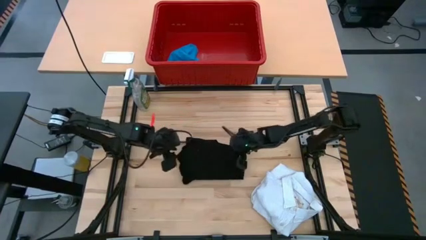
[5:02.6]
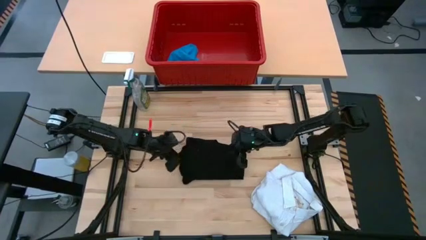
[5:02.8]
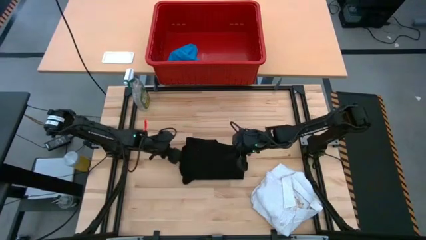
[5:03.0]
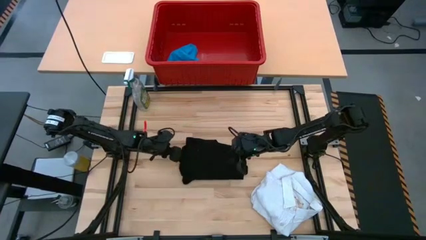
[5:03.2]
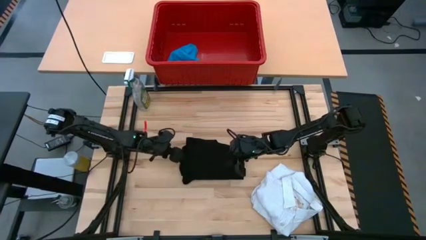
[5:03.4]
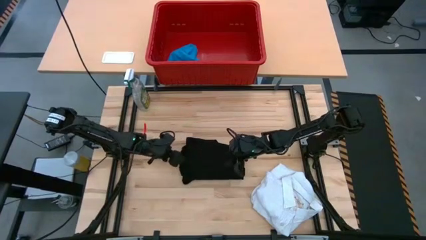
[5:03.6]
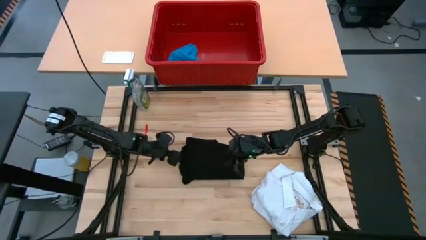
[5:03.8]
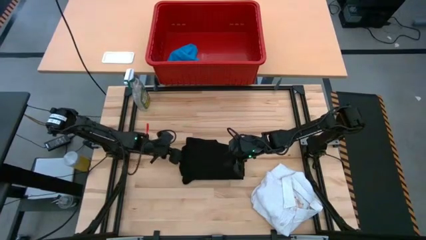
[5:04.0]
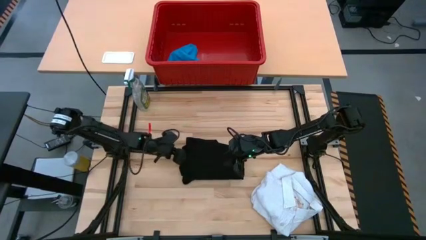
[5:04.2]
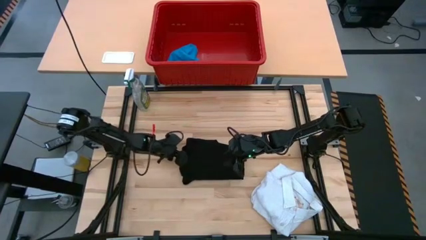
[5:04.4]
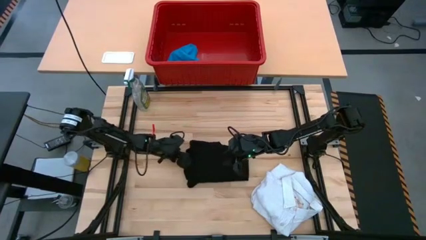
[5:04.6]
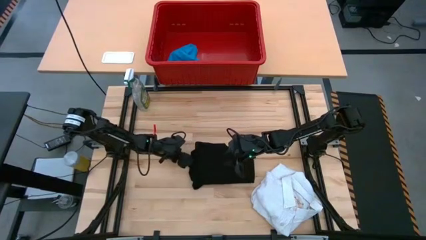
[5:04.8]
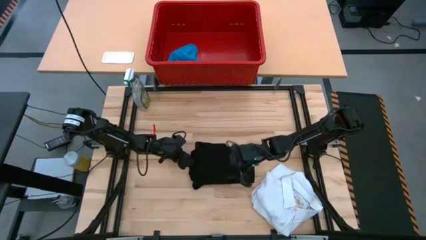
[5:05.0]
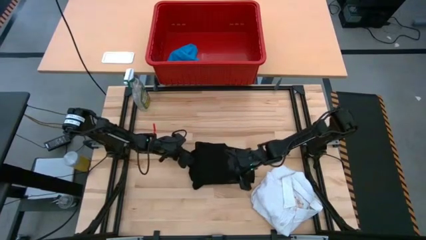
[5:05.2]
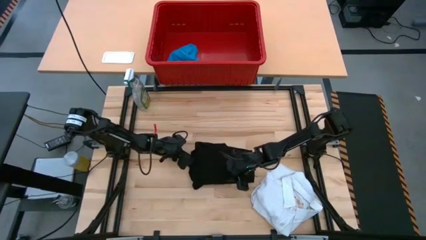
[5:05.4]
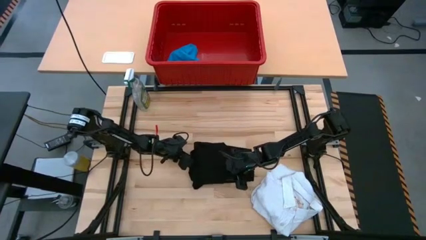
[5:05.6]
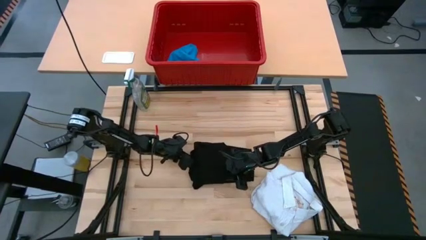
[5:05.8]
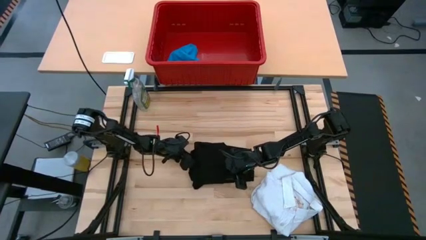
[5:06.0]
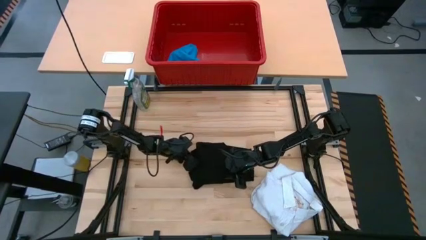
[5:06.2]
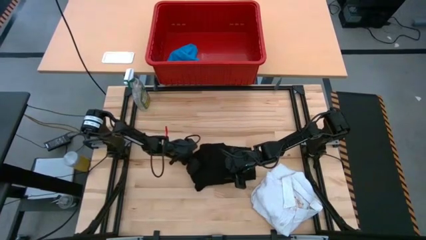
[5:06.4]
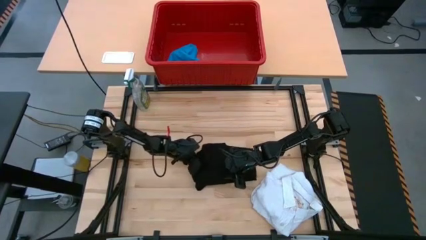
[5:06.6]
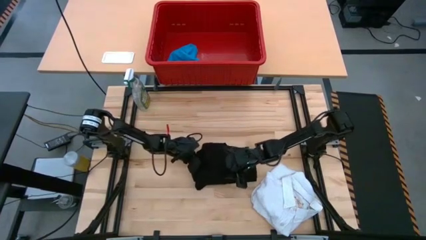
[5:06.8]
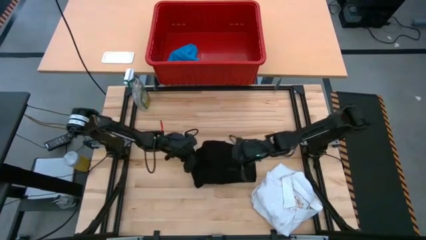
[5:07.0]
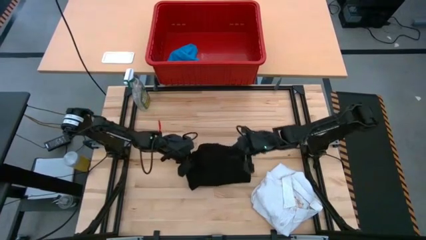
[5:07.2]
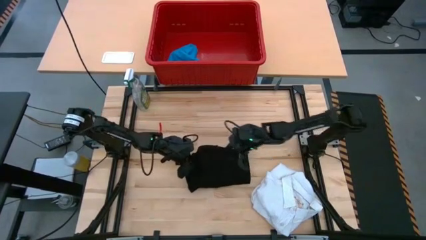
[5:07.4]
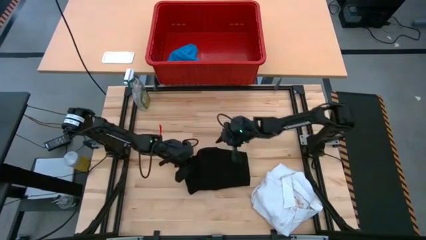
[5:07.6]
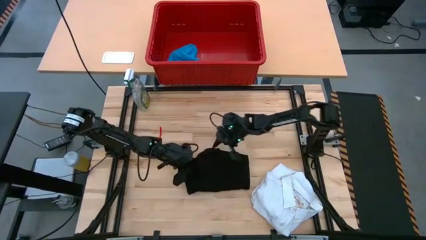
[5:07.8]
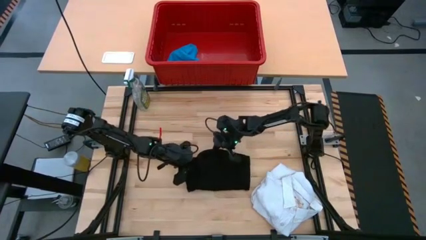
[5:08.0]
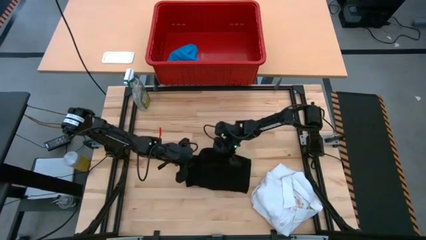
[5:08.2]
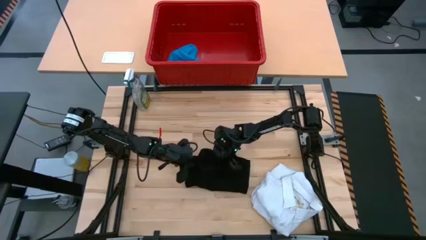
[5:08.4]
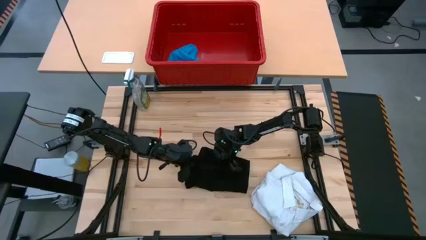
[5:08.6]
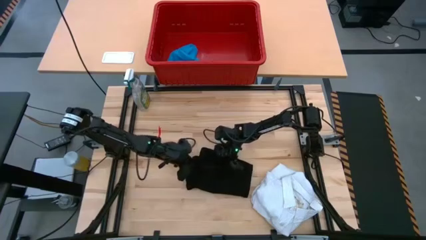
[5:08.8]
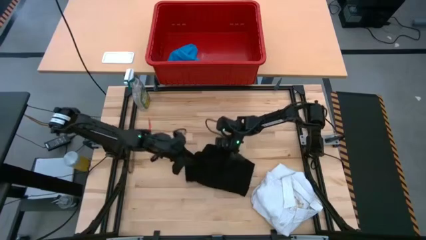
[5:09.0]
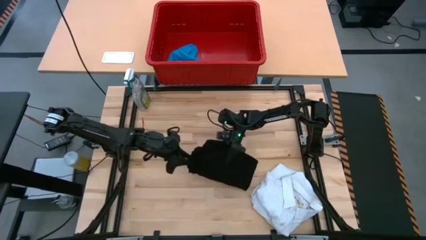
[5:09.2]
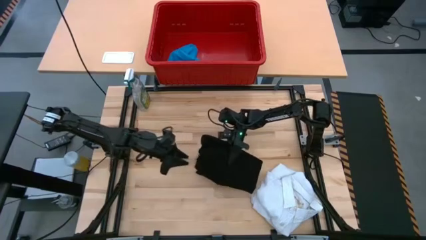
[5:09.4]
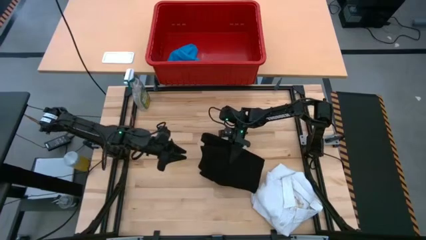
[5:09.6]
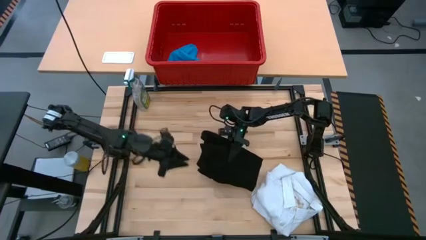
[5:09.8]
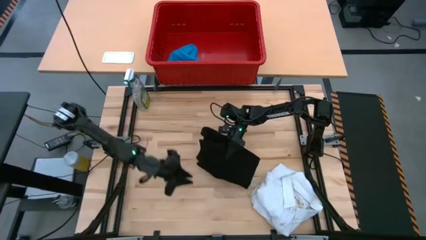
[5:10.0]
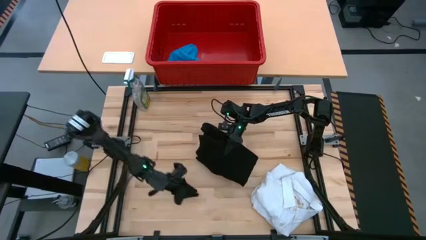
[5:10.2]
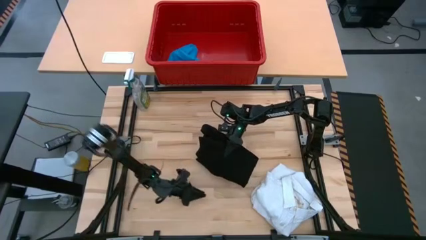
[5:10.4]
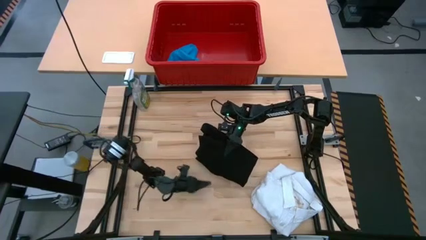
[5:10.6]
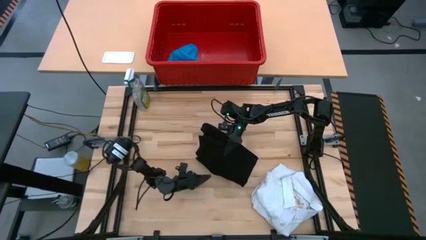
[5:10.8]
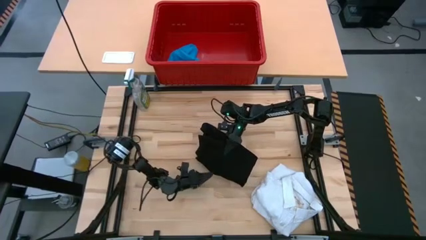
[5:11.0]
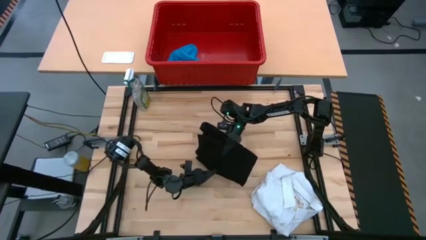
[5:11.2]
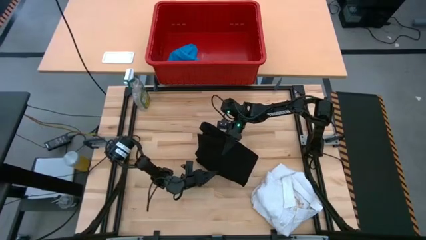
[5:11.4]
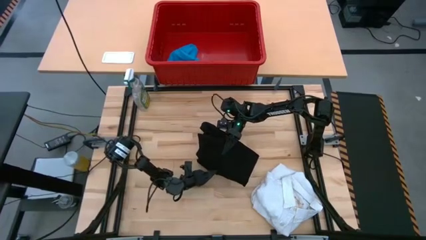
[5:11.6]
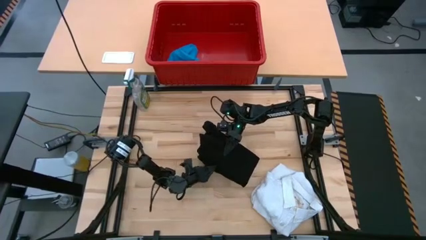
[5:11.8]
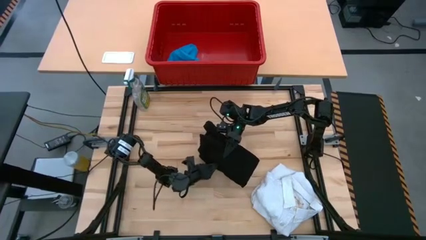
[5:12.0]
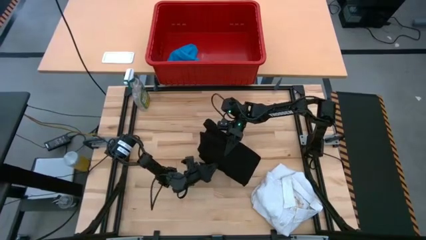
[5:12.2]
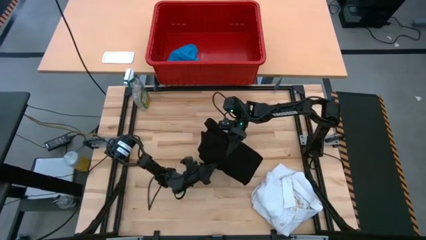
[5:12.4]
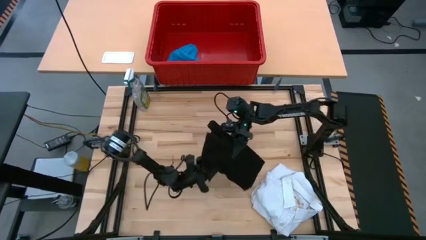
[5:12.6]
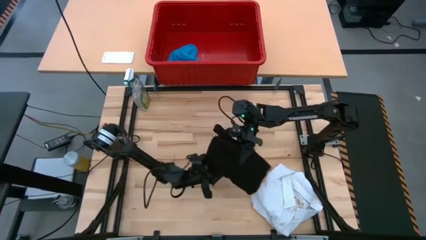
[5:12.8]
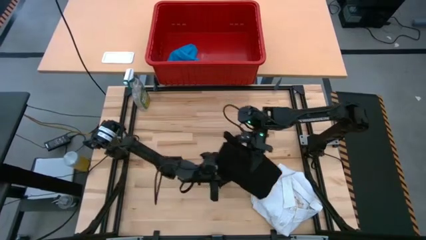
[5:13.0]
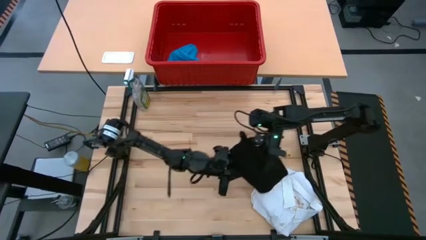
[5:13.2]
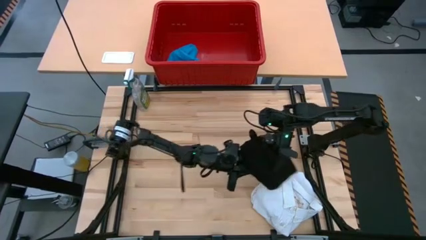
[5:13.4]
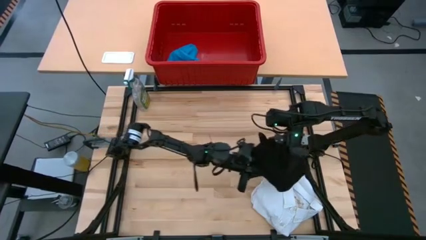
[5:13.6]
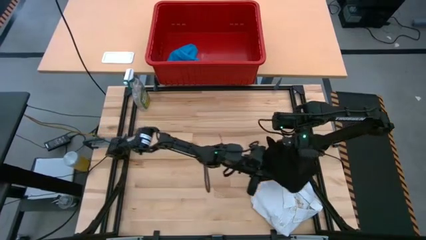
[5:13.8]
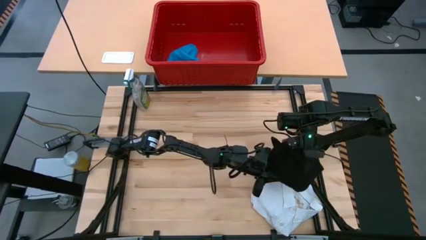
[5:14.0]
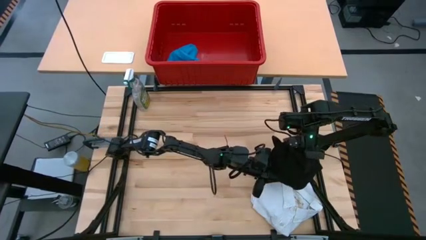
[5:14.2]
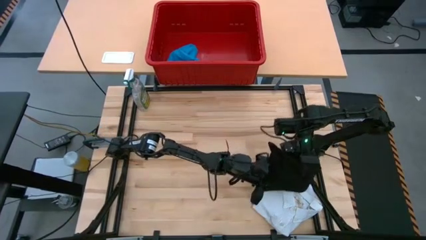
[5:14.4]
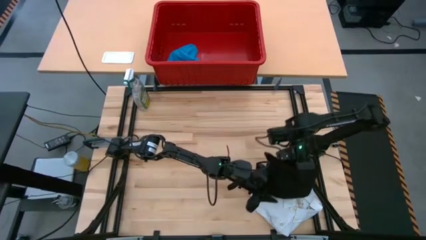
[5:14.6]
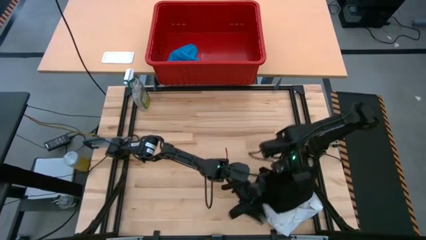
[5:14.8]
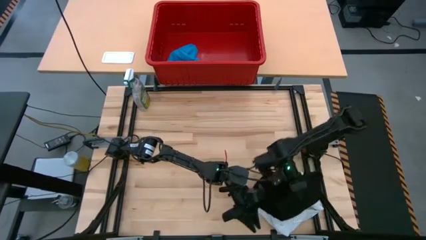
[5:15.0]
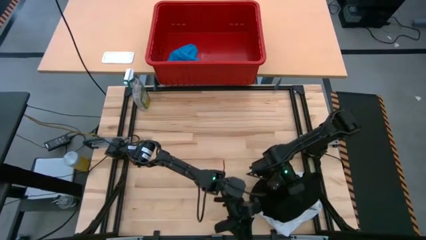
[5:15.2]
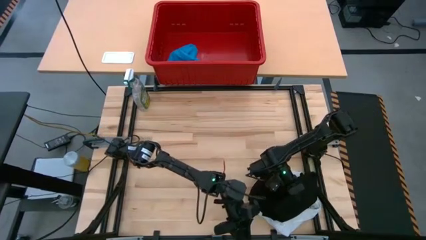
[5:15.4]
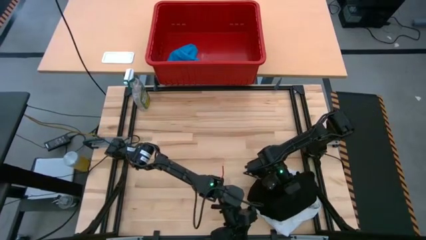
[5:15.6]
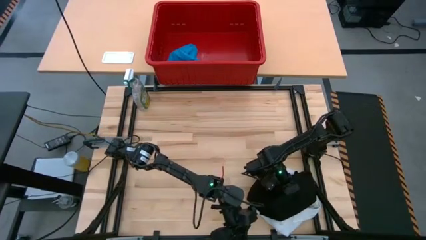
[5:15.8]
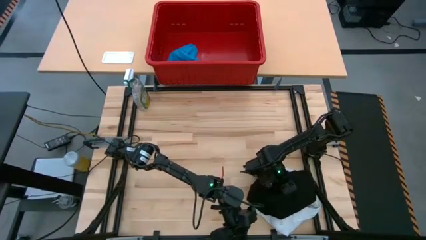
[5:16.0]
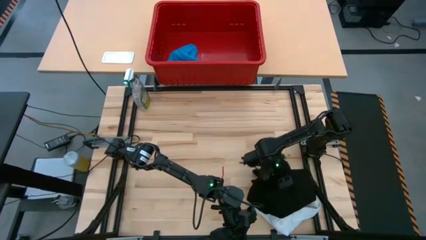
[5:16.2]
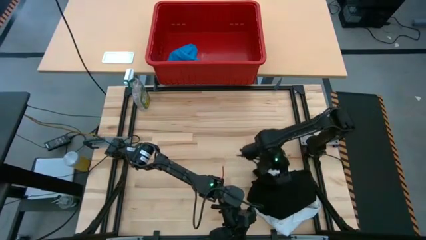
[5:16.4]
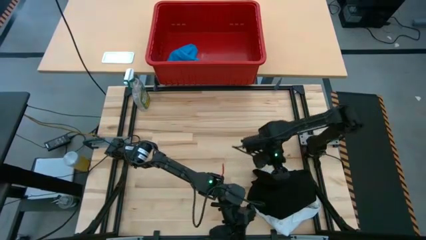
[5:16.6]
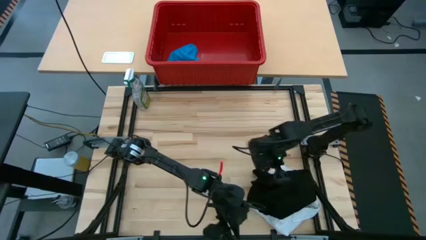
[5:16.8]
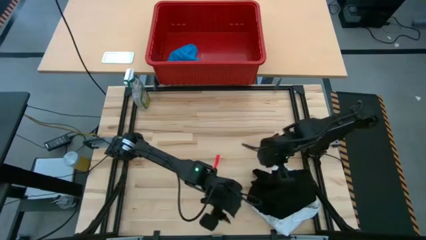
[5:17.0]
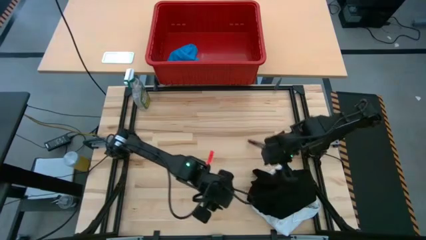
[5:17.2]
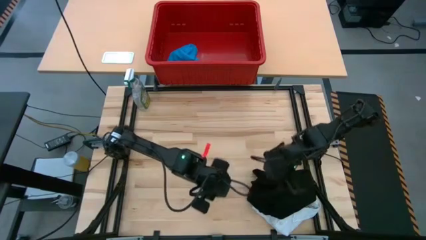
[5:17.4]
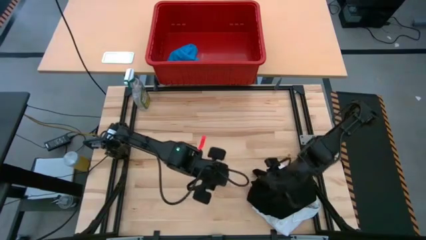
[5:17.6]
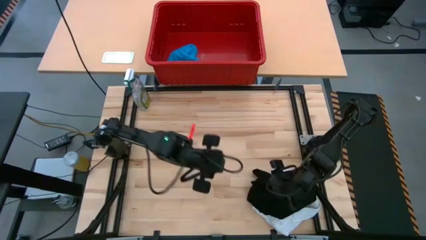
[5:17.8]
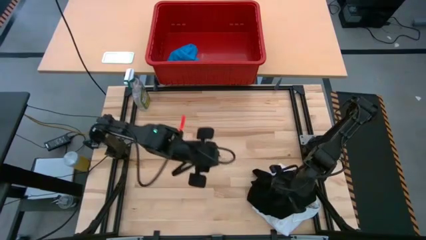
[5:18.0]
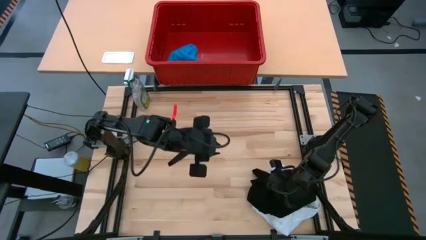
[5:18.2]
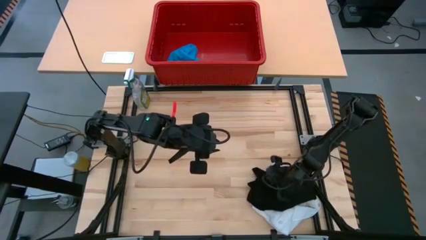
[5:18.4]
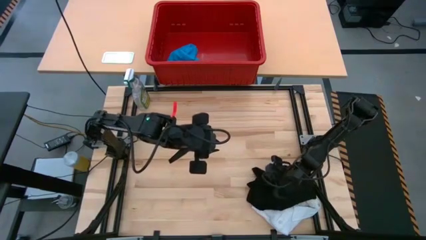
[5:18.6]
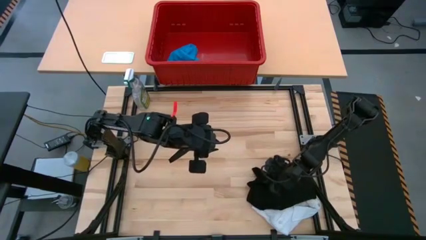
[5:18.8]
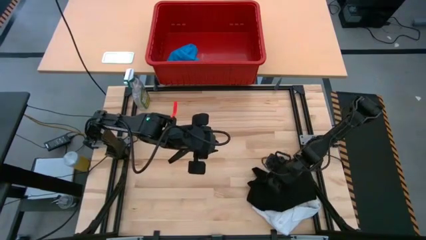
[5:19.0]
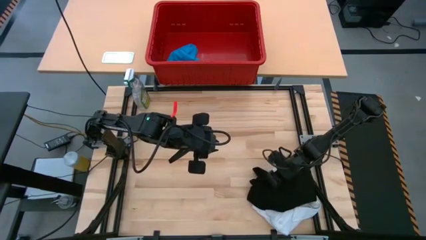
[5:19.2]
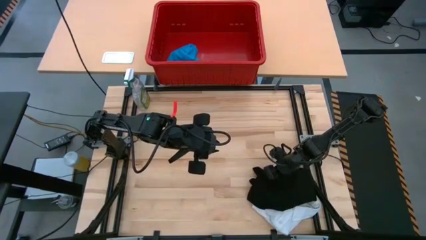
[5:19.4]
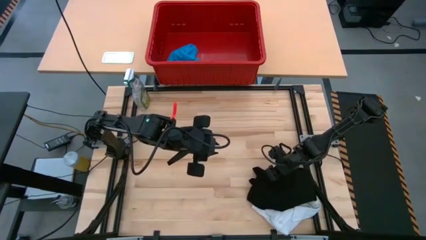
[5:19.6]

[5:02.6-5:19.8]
Task: Fold laundry
Stack the folded black shirt on top of the folded white polo shirt
